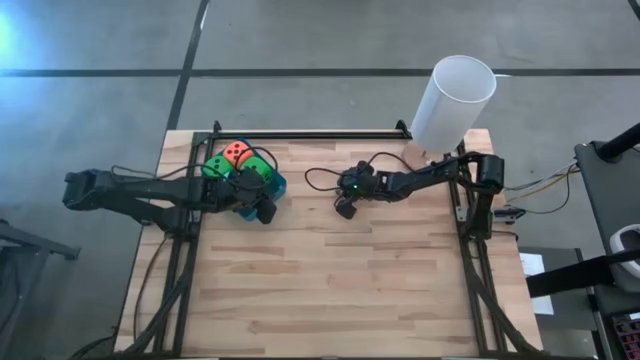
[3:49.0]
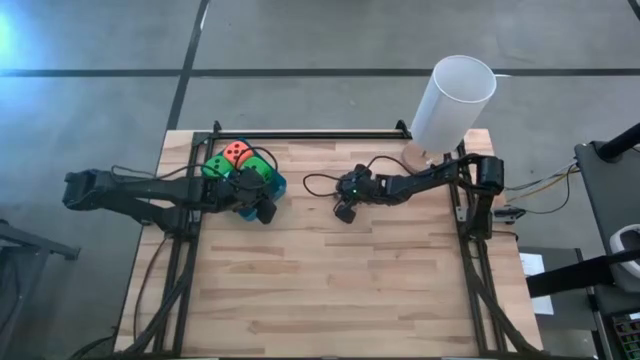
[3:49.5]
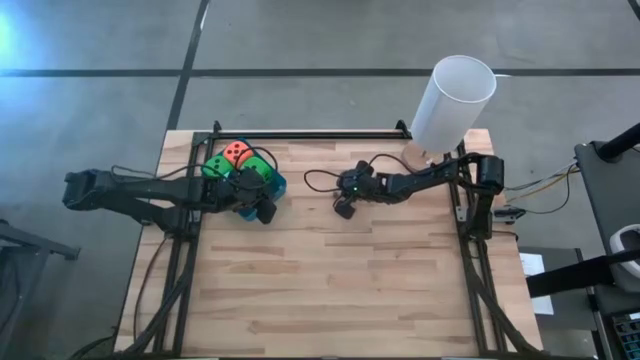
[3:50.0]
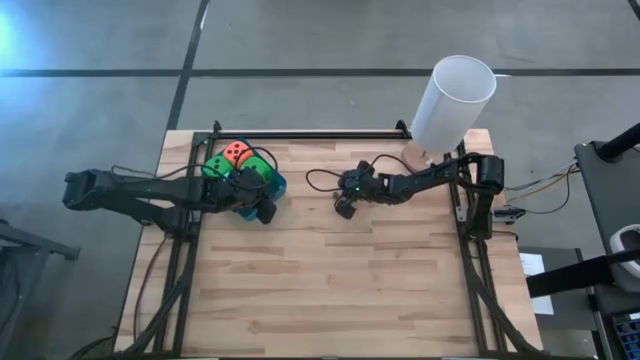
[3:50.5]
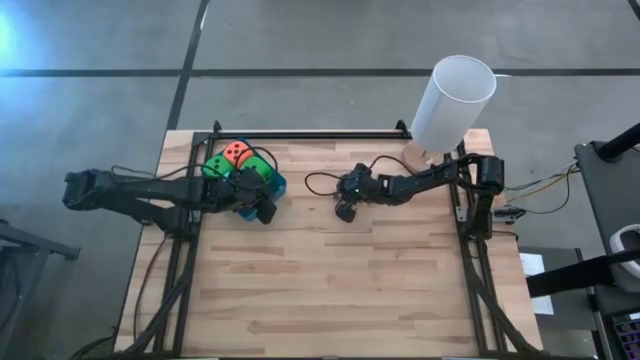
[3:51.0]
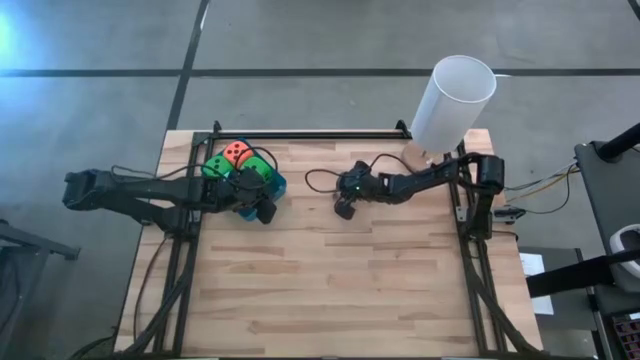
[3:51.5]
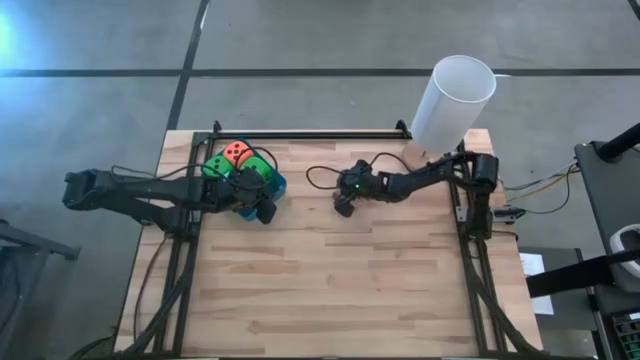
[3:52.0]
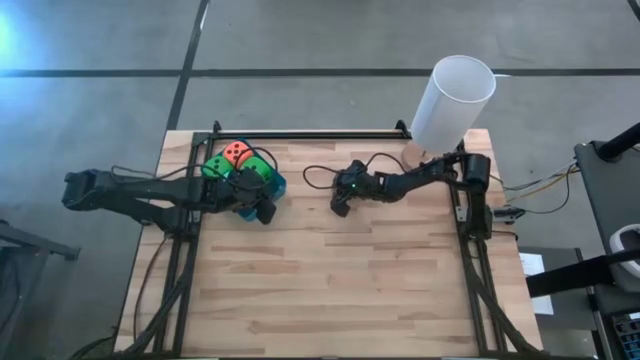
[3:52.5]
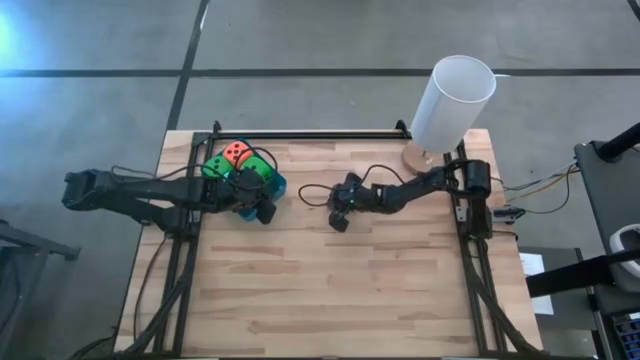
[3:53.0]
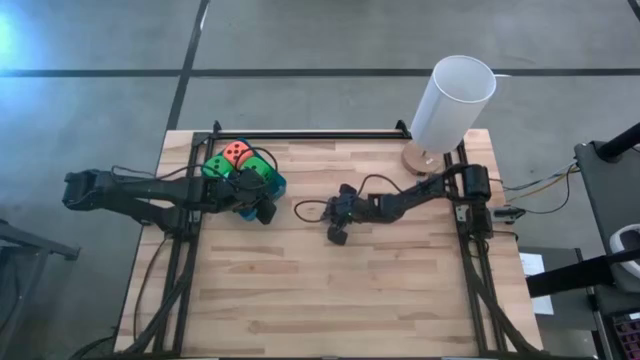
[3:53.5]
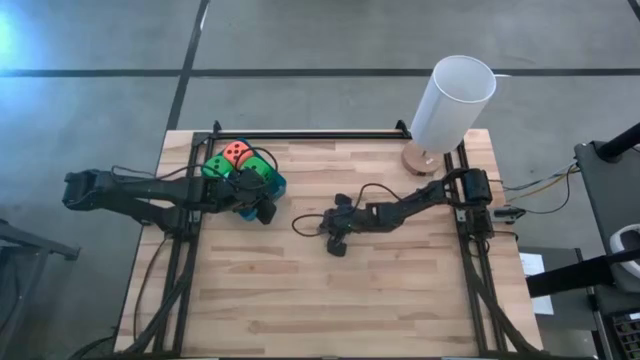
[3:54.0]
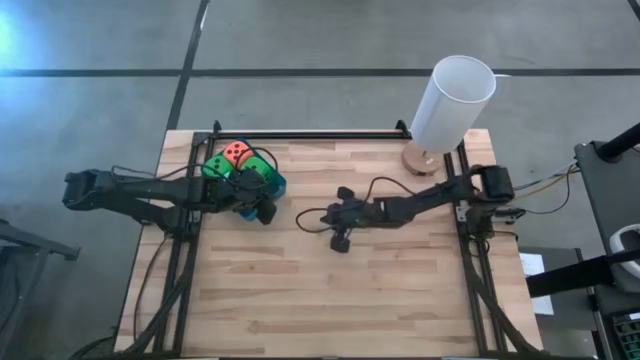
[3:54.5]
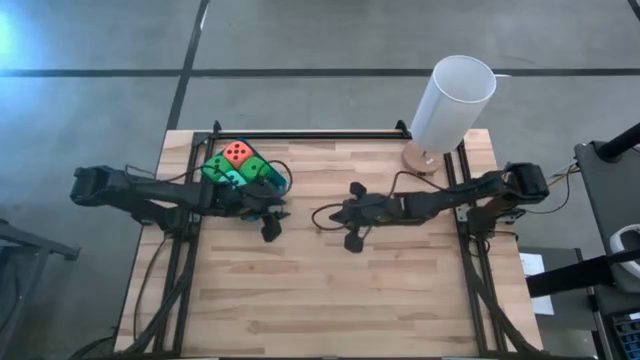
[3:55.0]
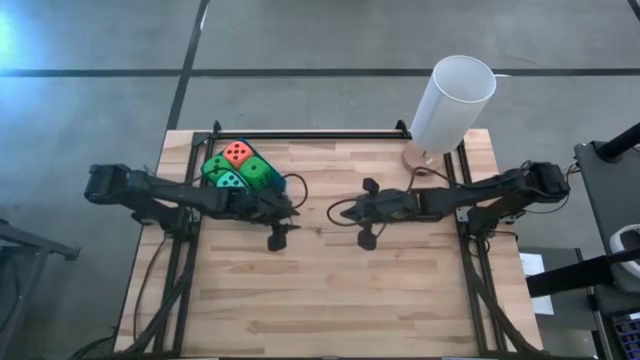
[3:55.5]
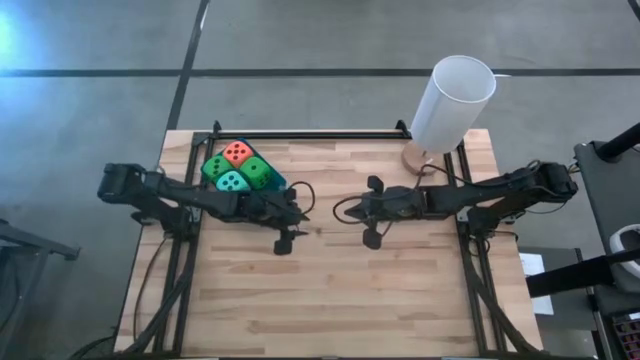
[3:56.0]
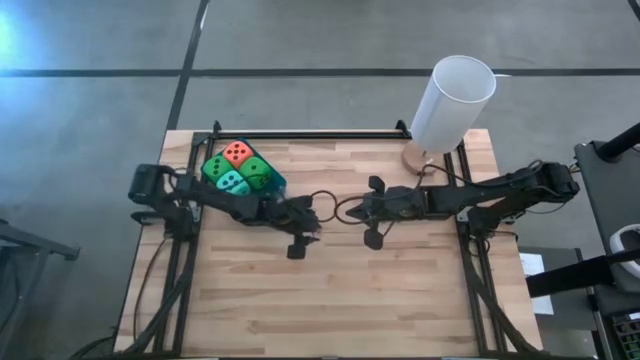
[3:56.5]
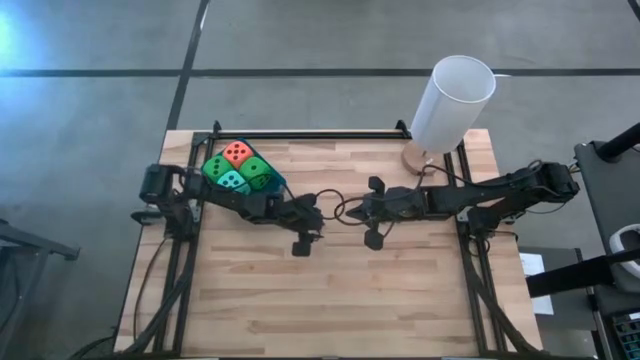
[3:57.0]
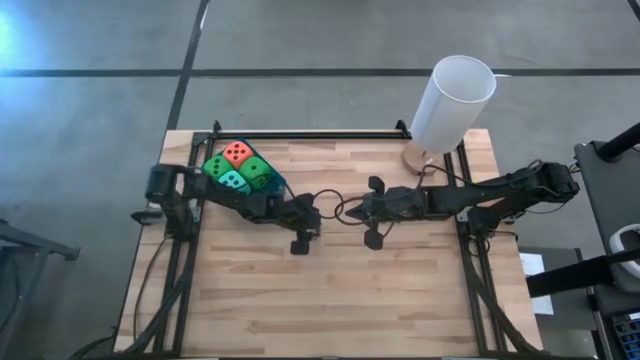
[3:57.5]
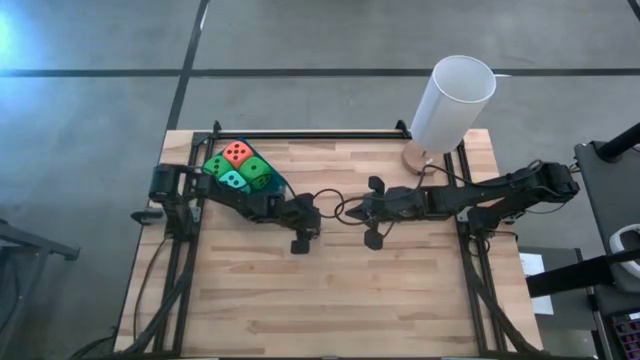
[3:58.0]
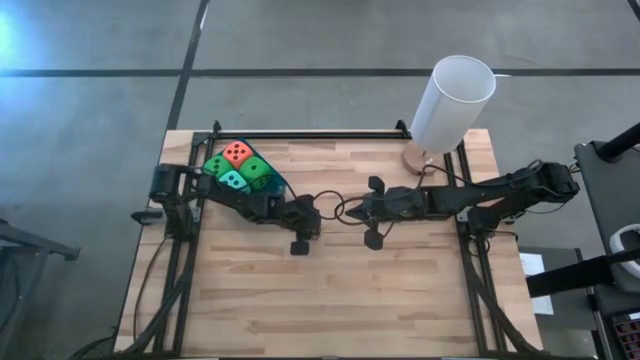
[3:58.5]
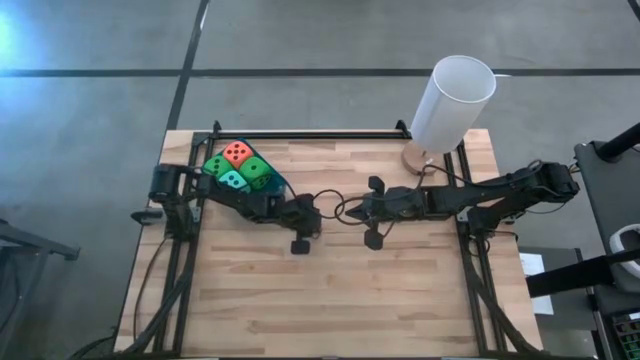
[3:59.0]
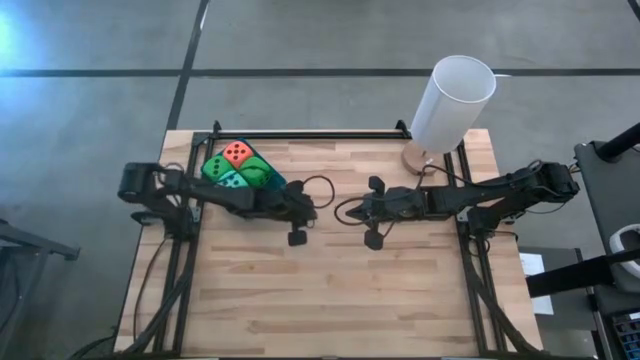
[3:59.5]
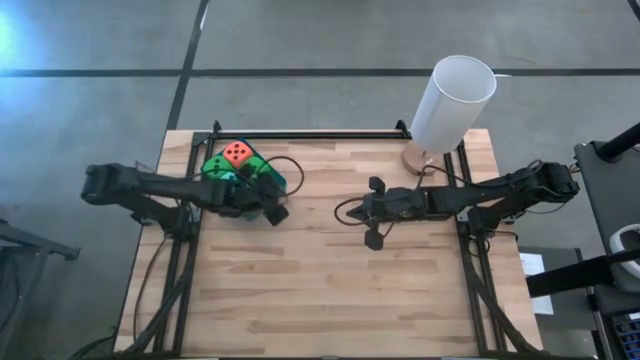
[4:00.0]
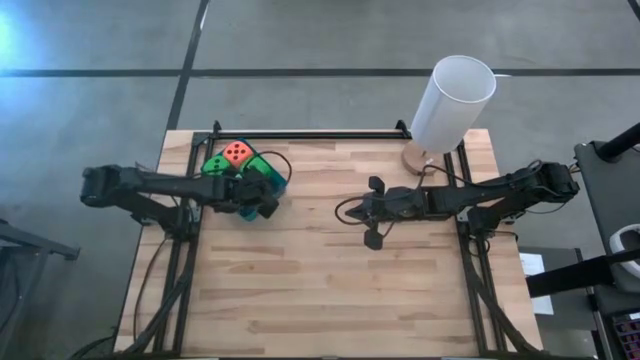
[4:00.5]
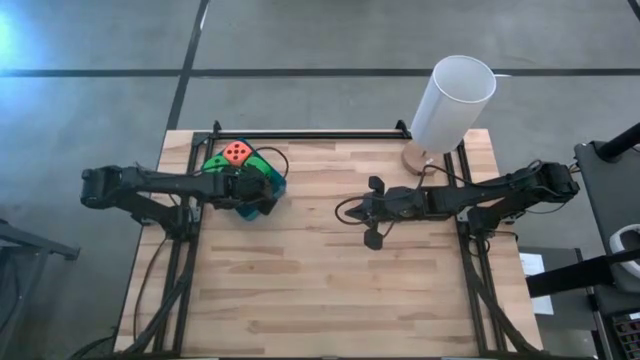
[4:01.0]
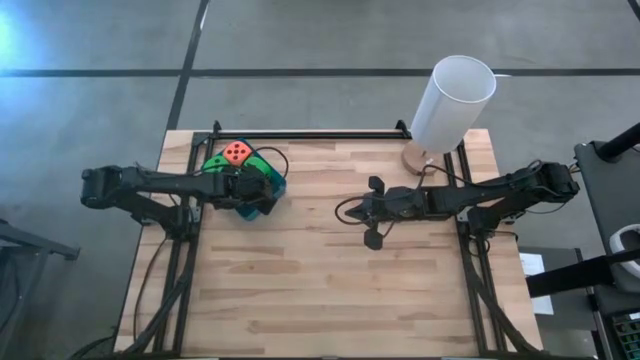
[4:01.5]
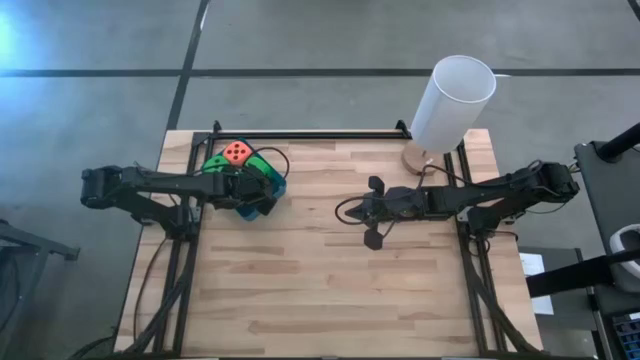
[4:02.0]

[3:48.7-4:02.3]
Task: Pick & Place Dice
Put the small black dice into the blue bin

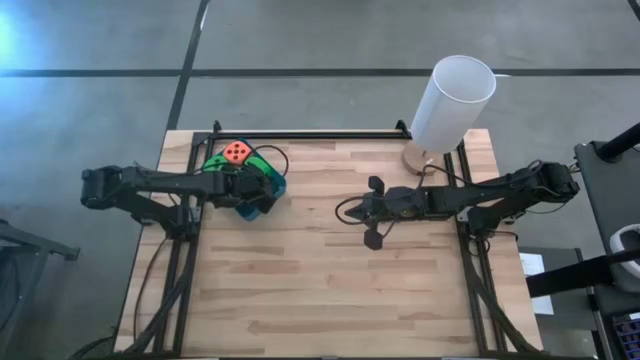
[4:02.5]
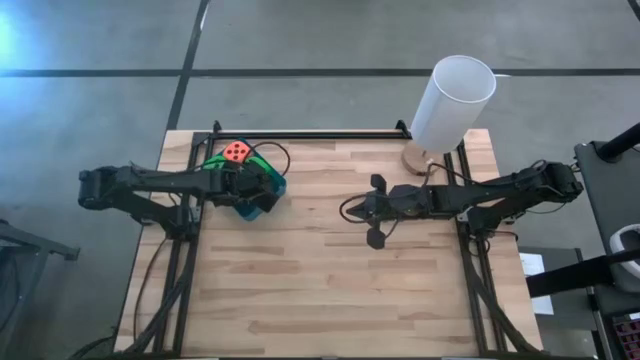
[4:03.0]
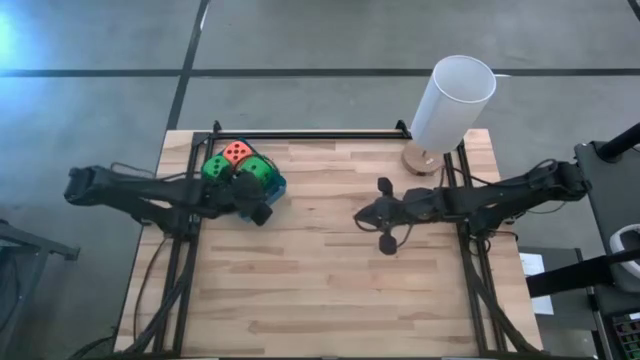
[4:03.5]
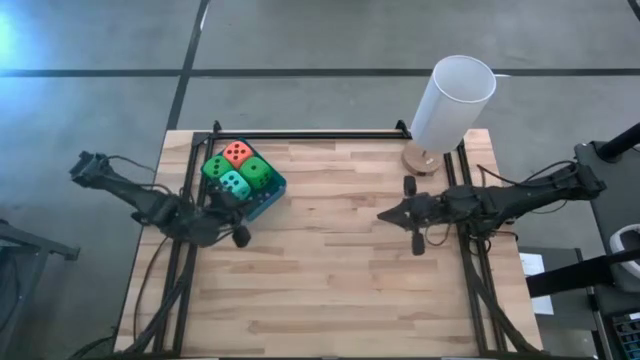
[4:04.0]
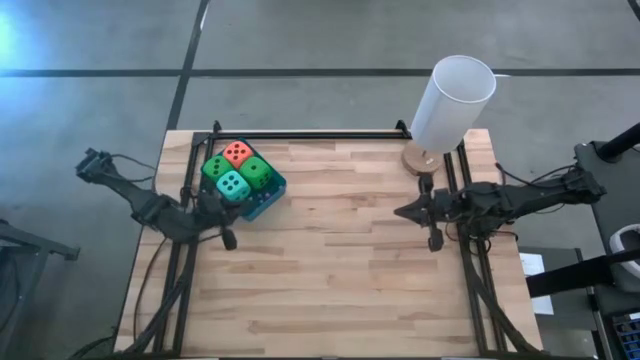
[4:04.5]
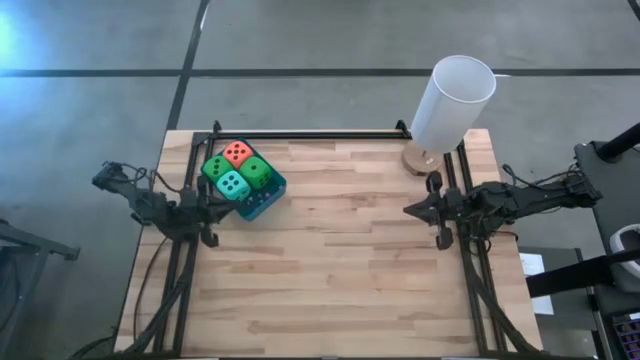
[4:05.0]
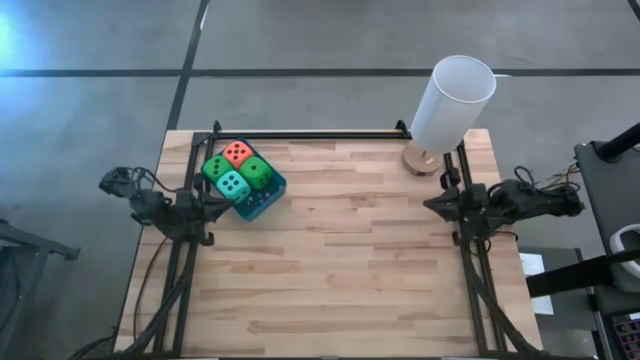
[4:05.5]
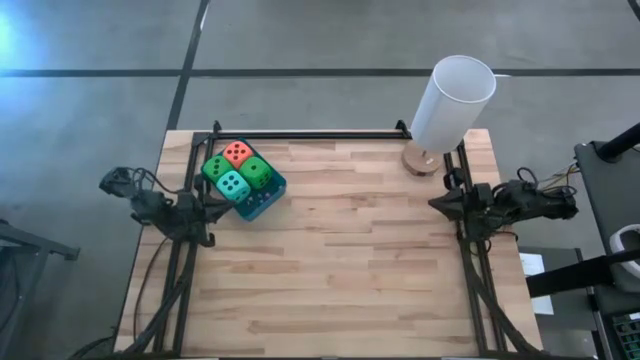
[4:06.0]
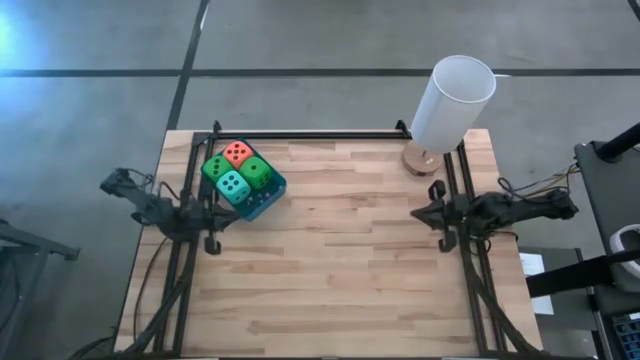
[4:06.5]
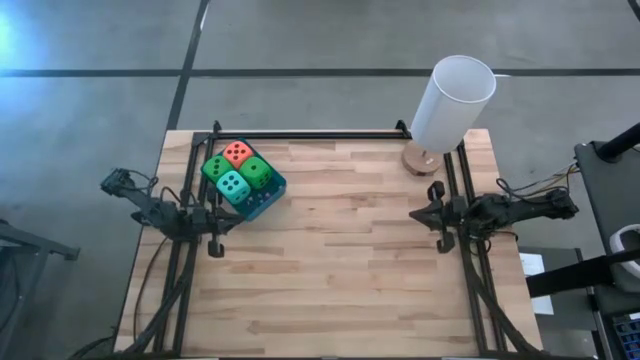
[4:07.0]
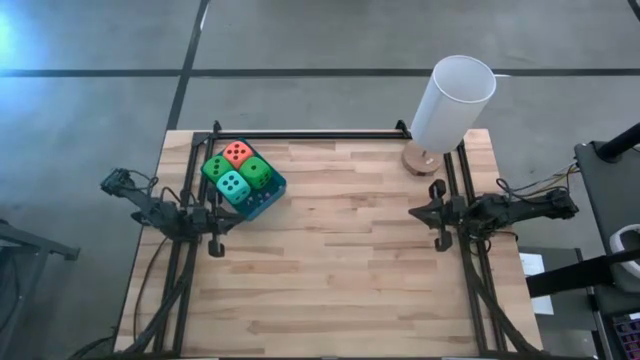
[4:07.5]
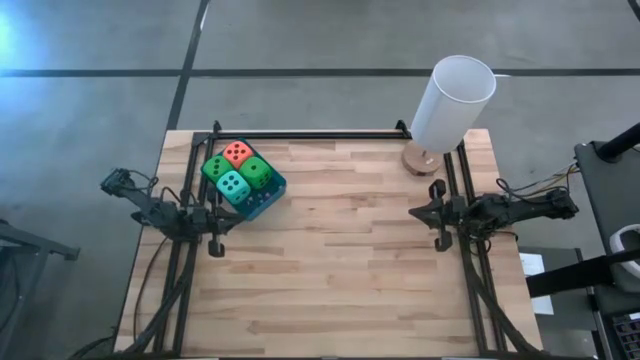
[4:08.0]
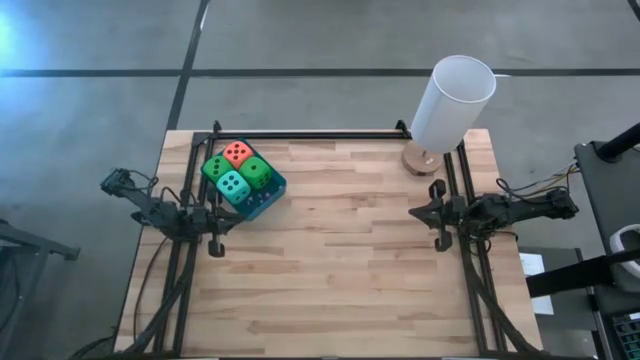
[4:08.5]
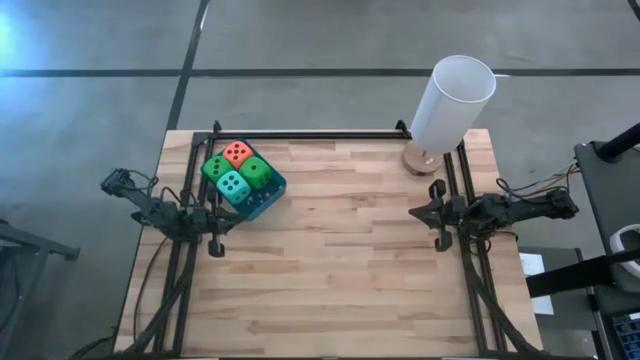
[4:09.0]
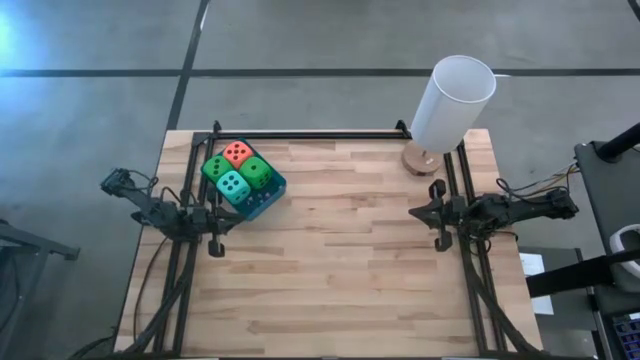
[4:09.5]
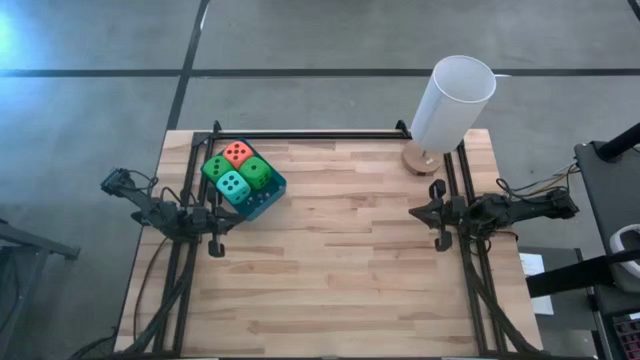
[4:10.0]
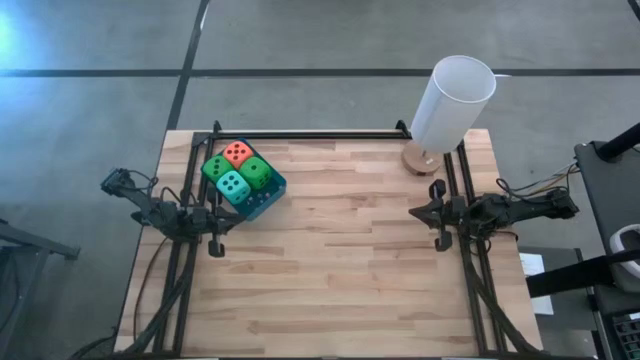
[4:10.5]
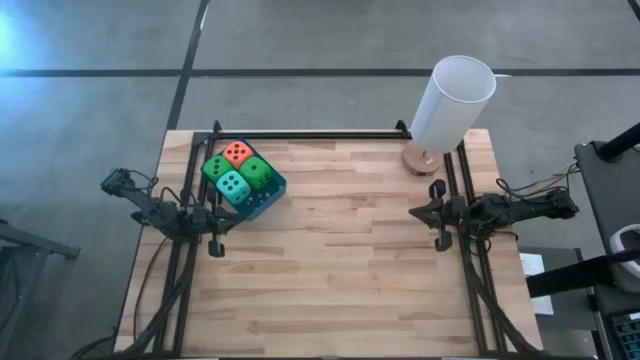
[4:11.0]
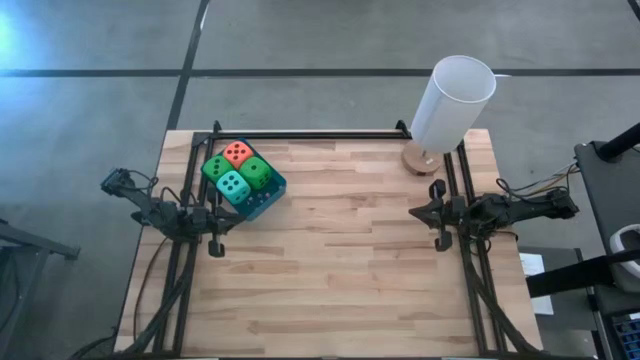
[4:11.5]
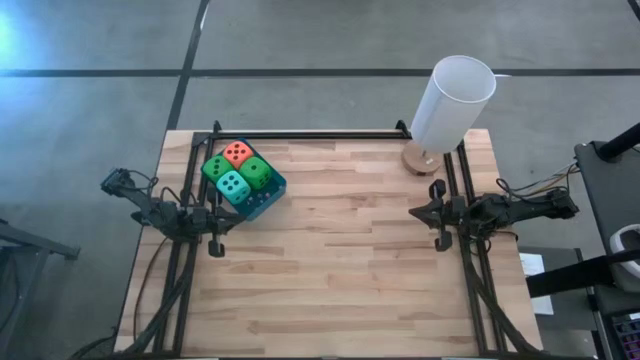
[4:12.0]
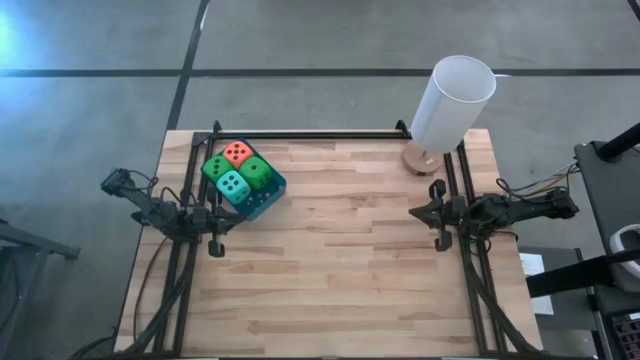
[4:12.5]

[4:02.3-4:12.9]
Return to Home Position
